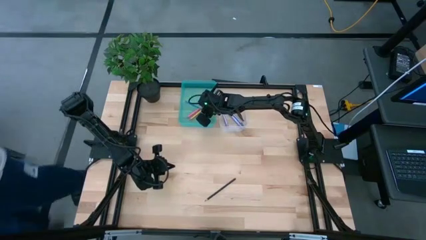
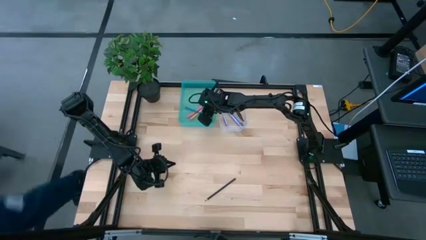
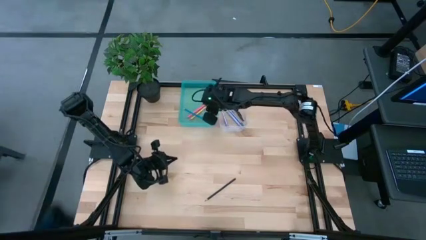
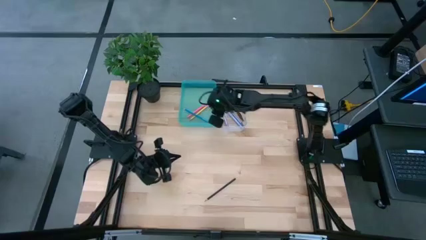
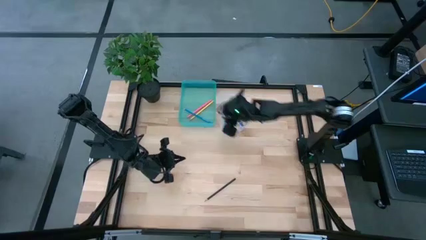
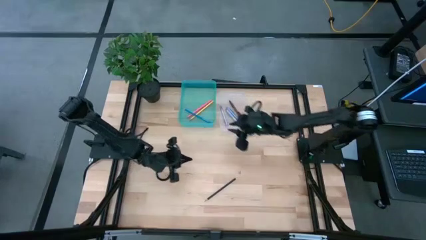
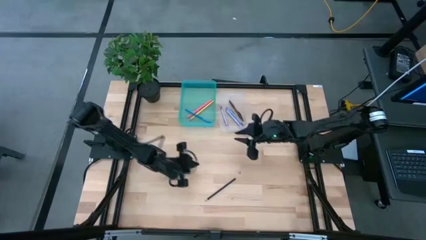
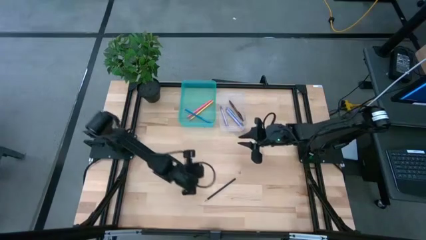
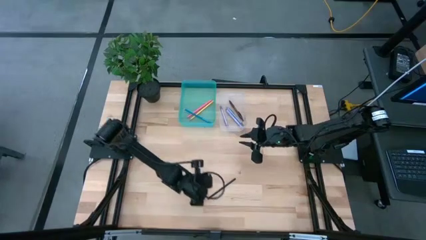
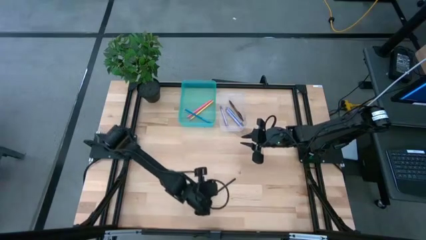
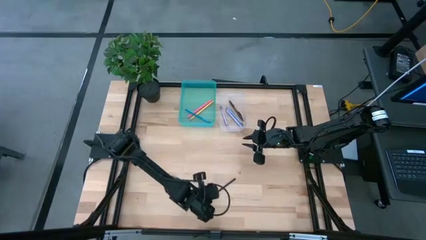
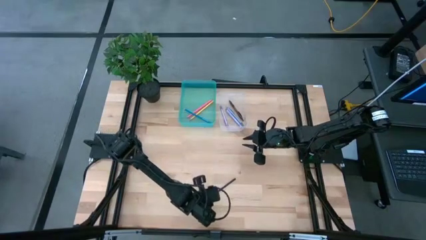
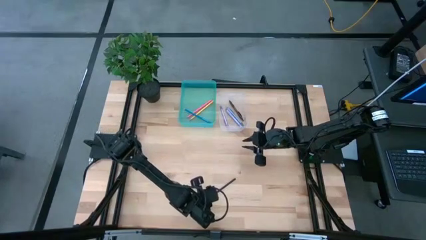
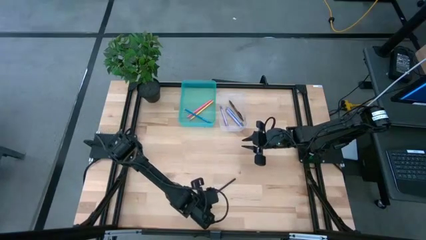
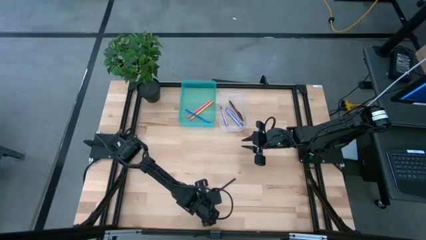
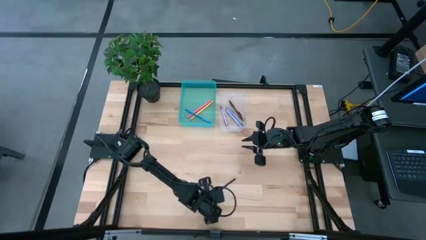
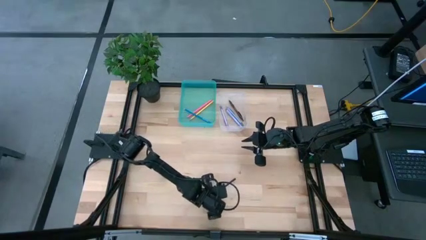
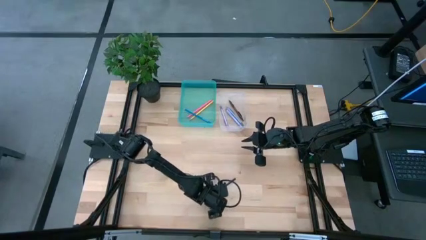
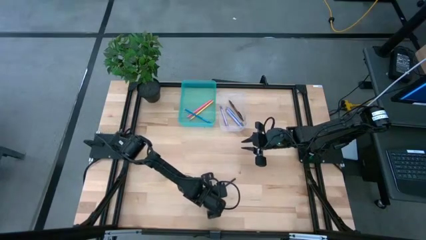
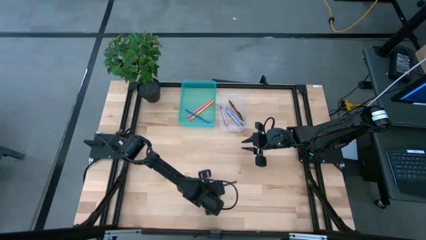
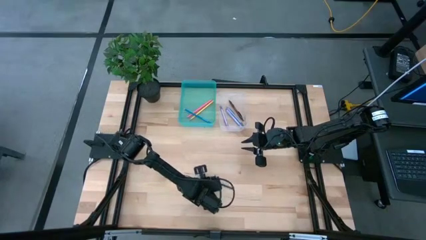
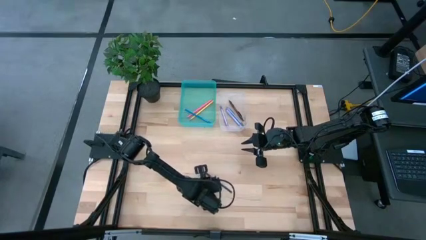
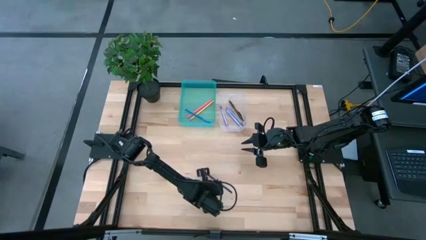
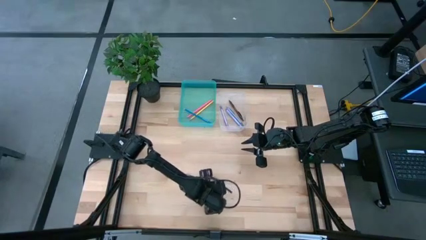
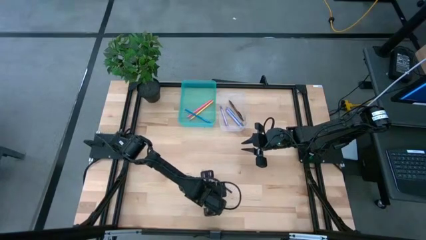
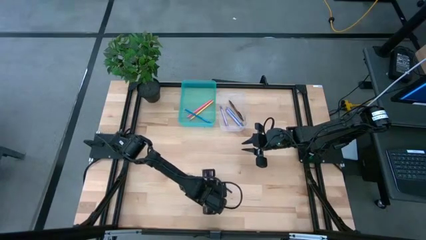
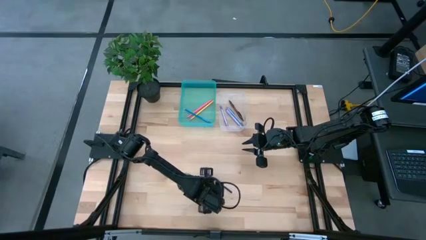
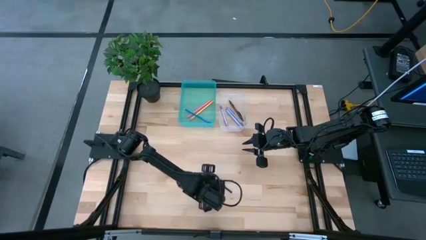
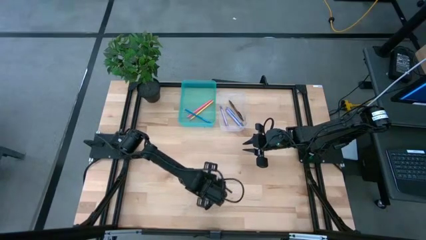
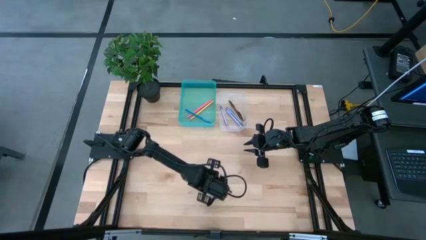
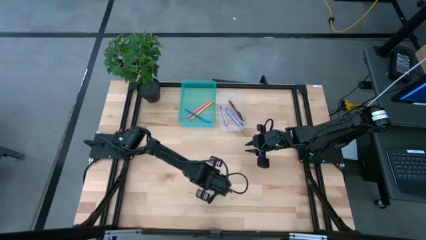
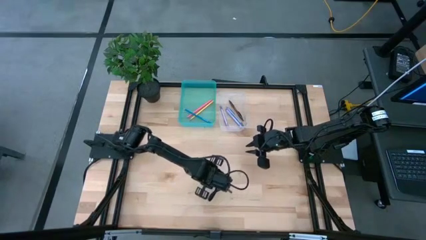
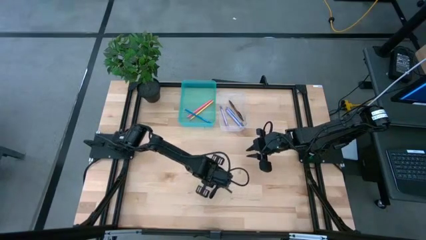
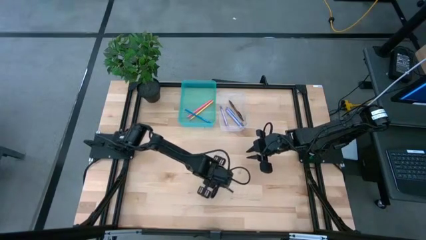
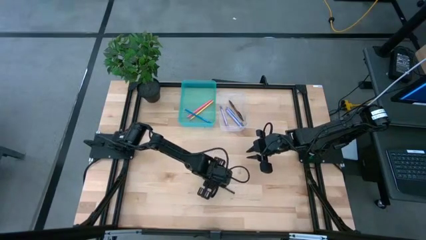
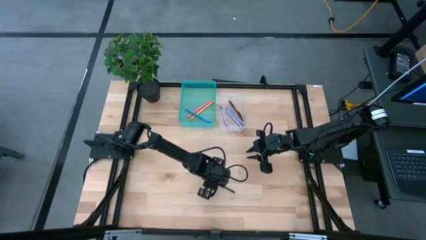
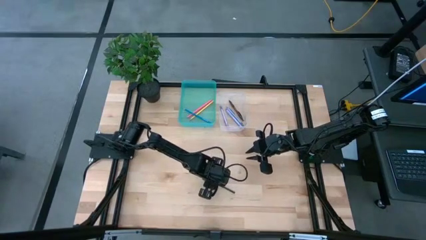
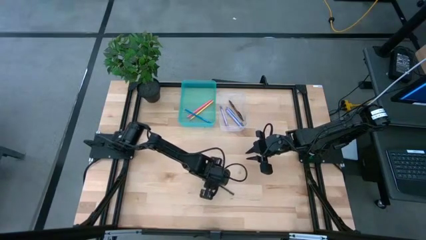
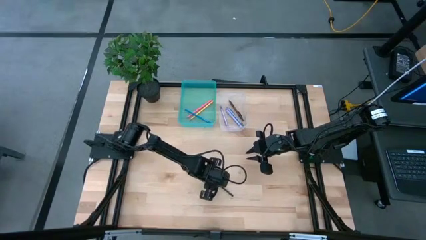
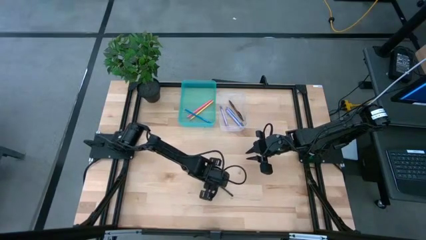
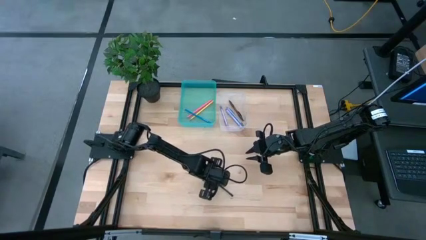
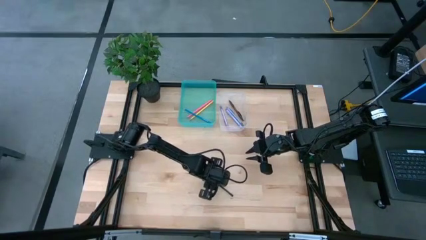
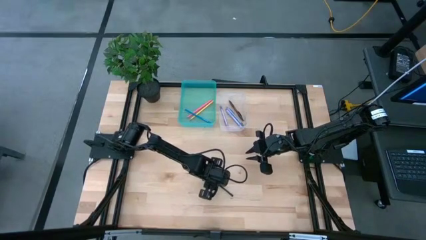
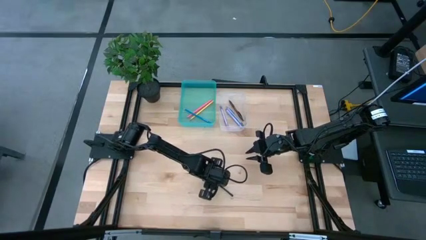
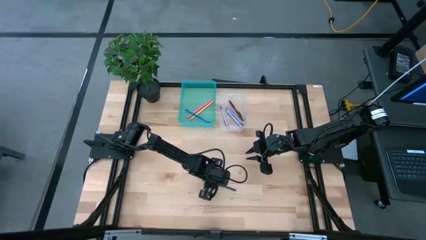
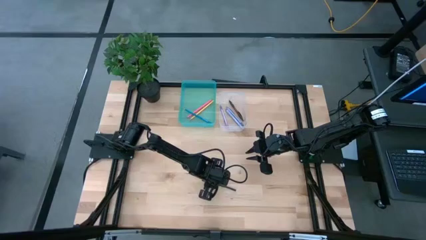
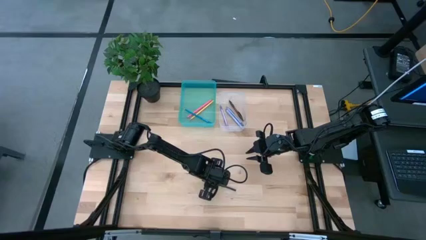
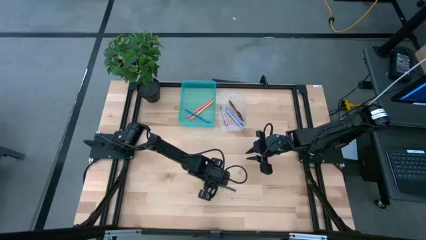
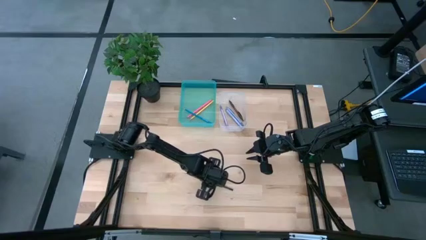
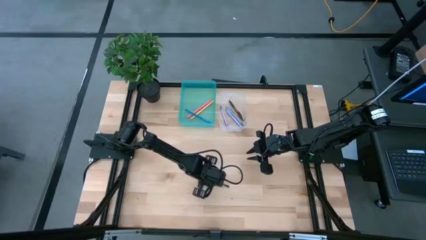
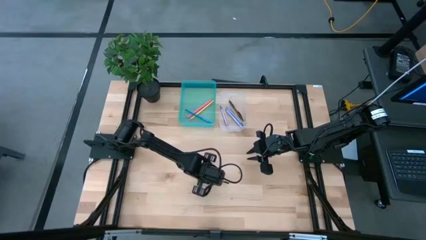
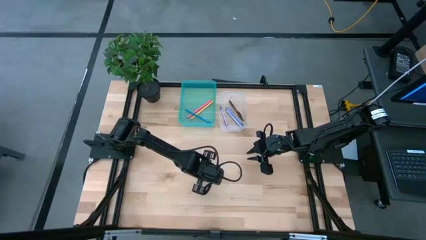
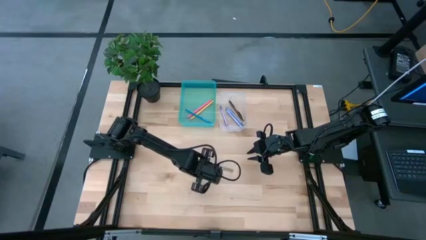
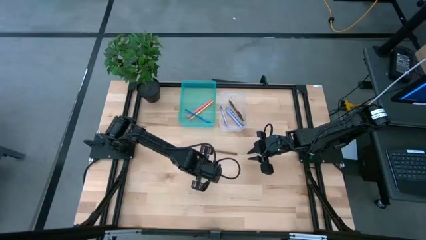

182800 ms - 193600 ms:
Task: Sort pens & pencils
Put the black pencil into the blue bin

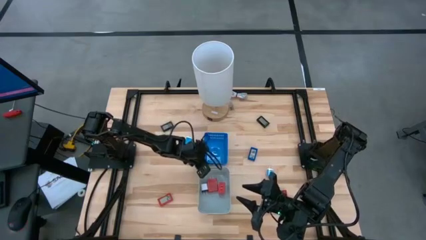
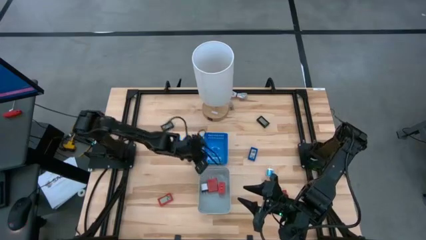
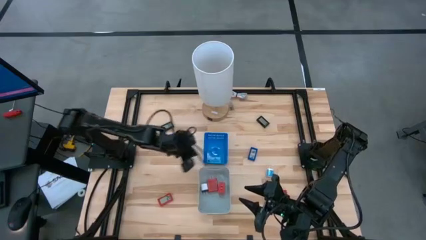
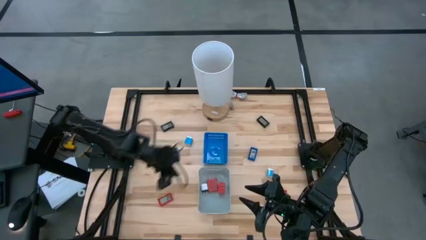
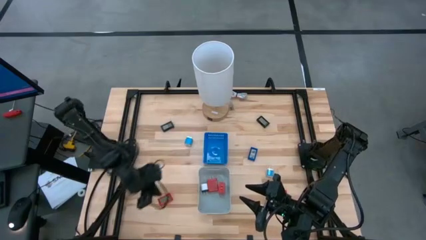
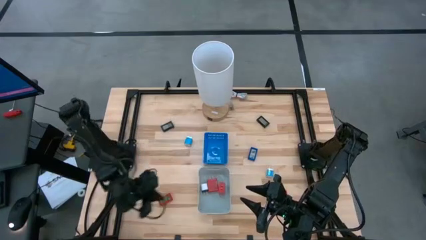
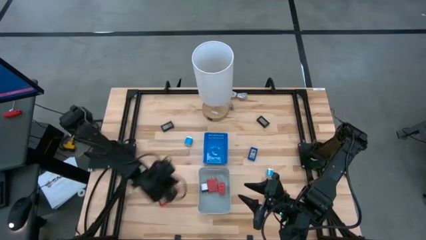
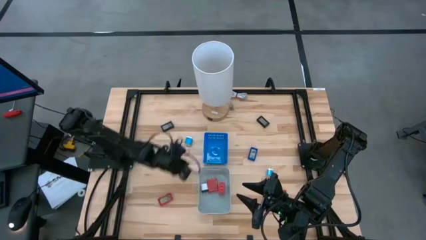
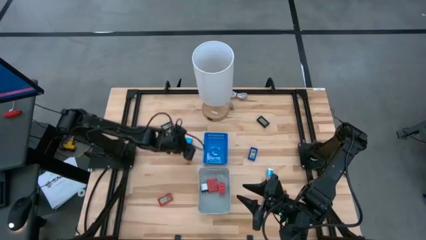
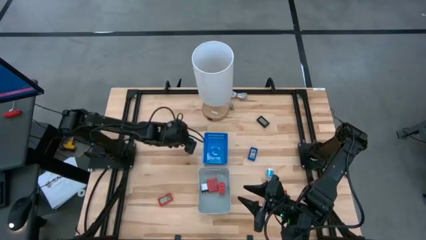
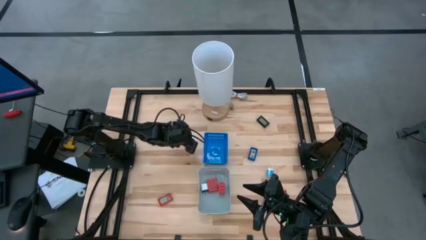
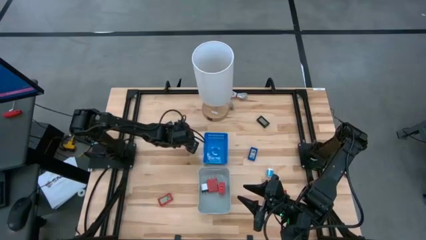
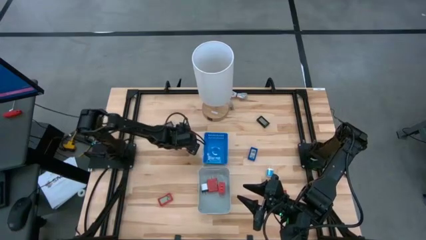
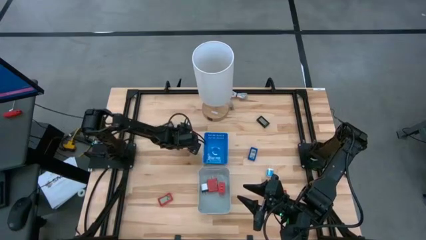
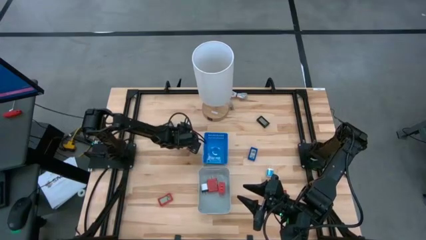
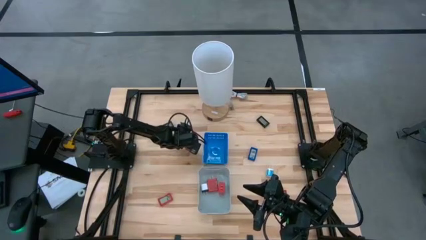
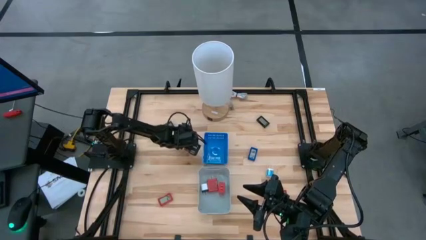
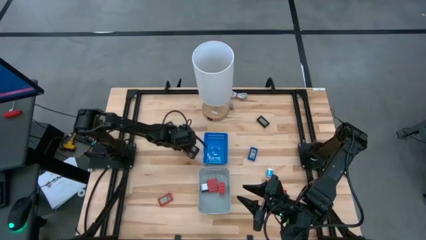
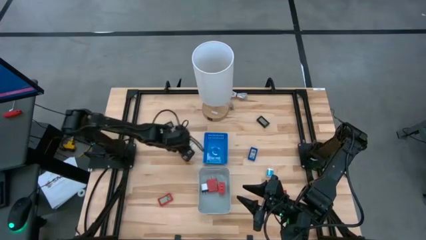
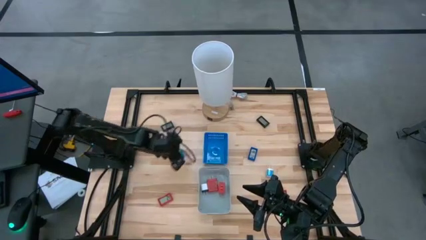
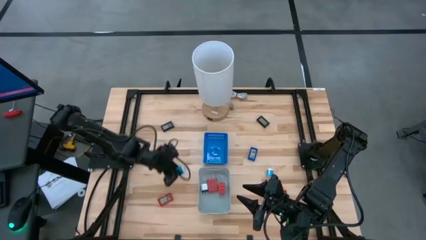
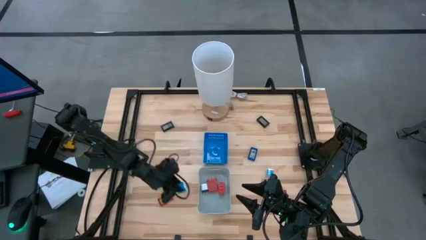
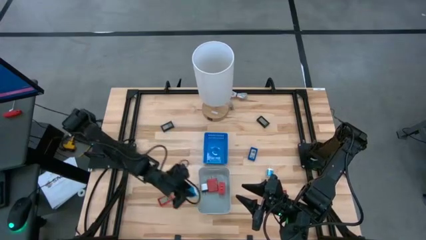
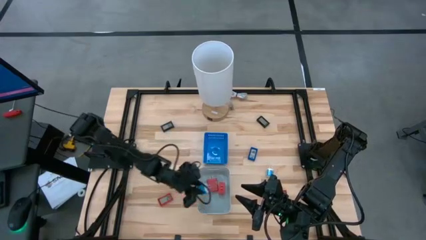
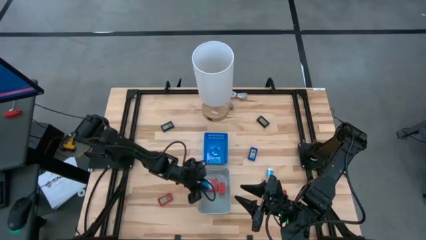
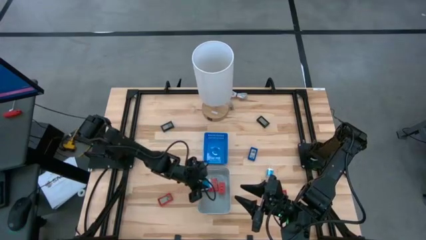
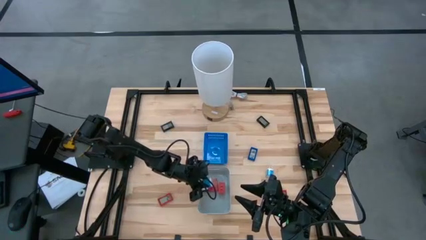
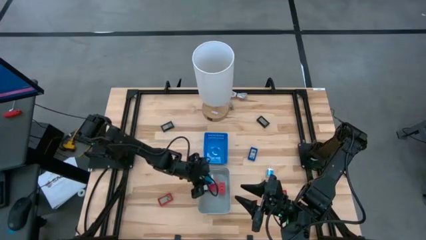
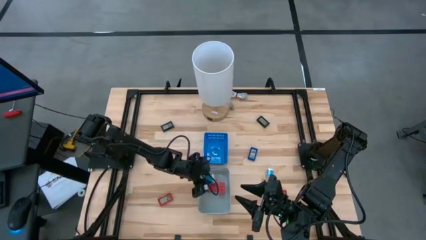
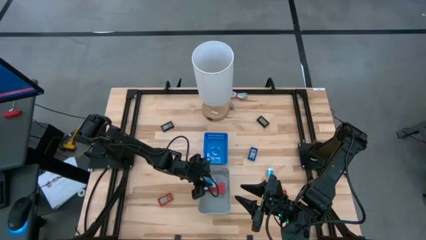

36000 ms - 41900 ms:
Task: Pick & Place Office items
Put the top blue charger adapter into the gray bin
